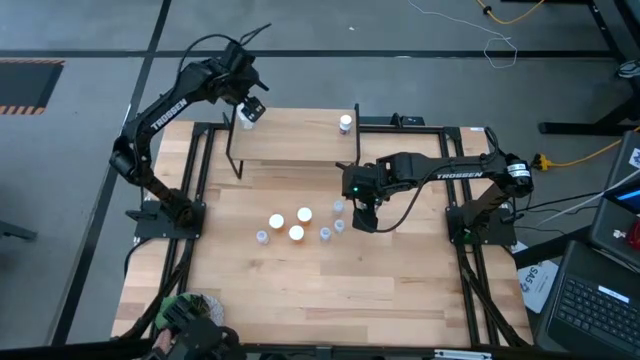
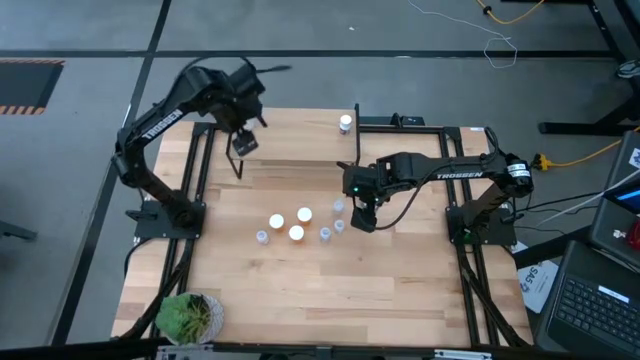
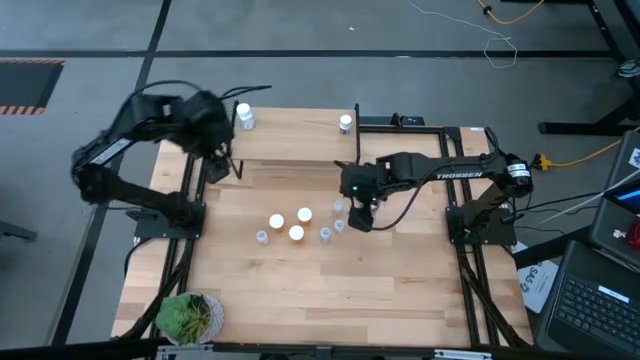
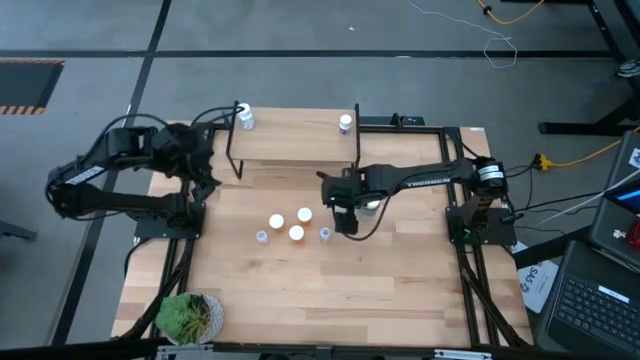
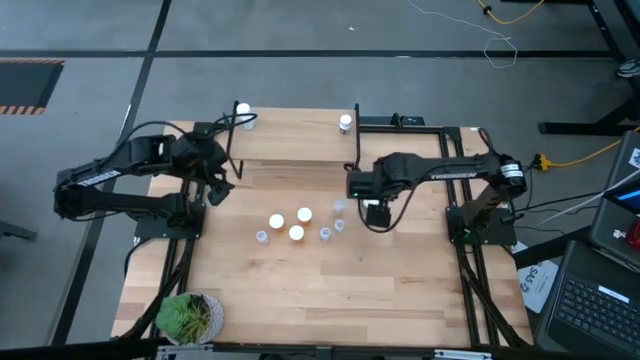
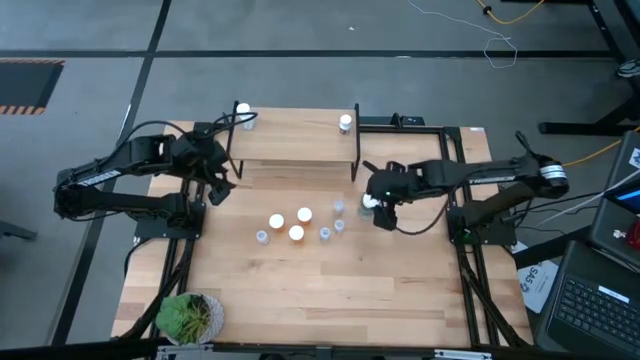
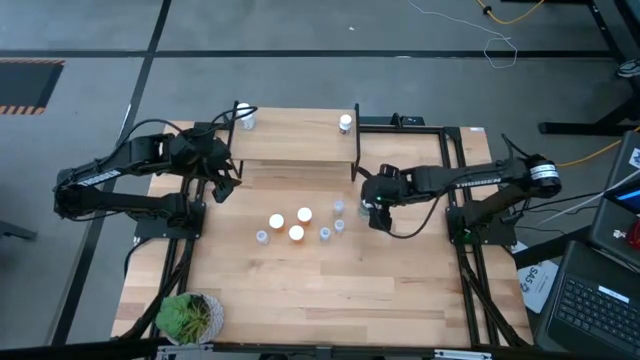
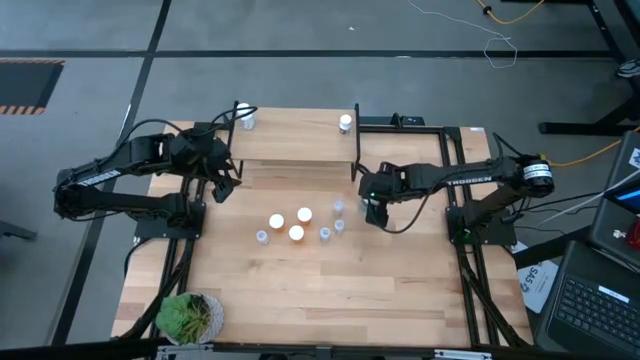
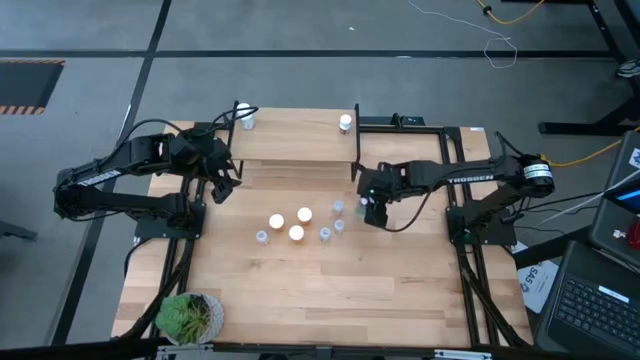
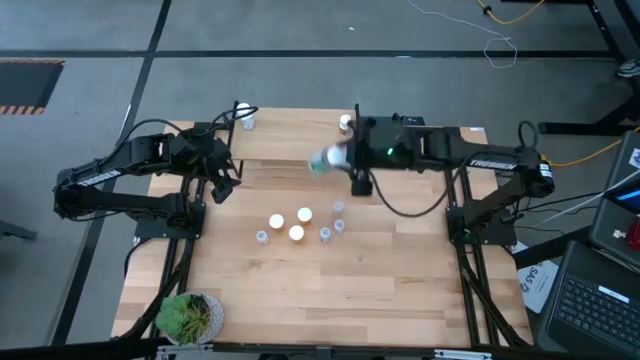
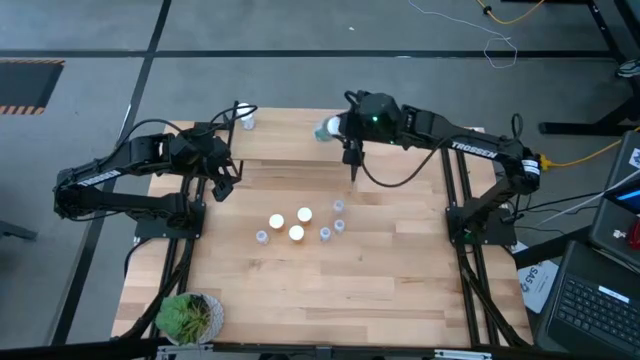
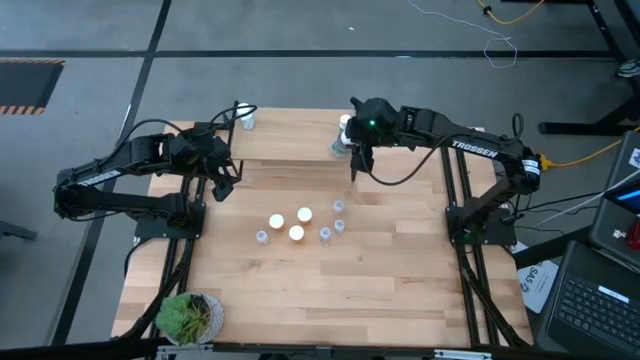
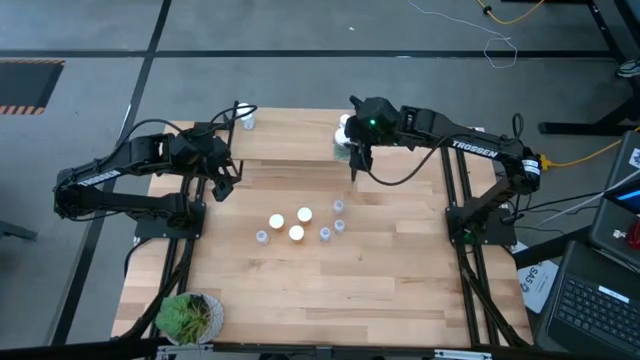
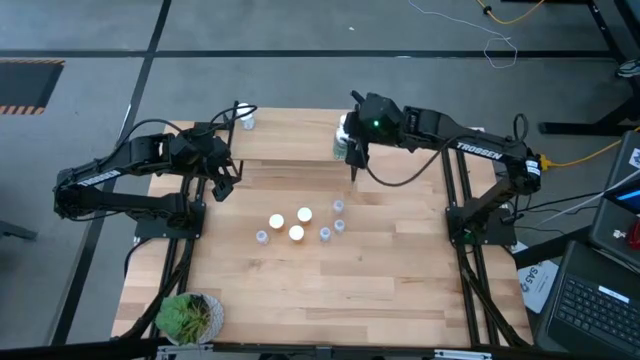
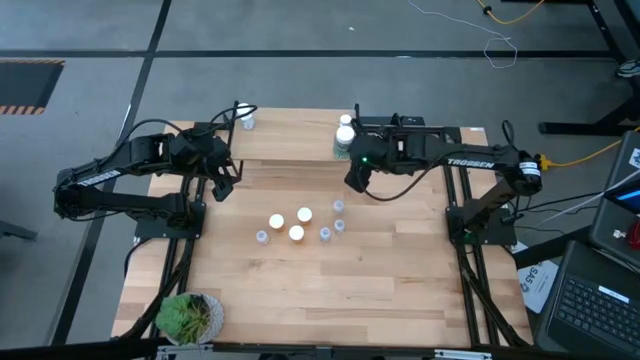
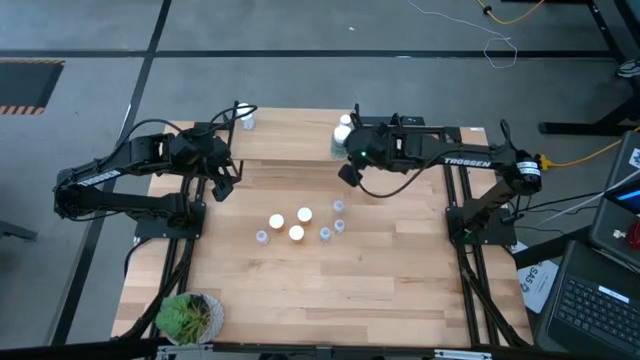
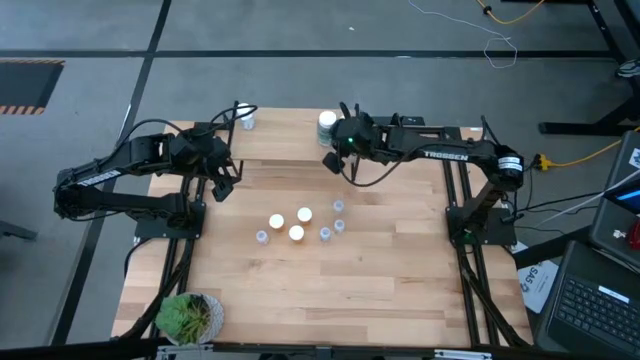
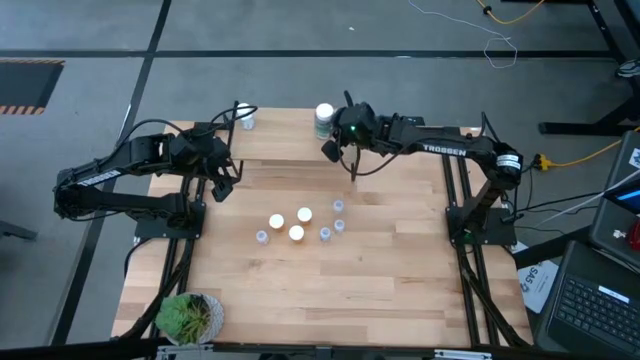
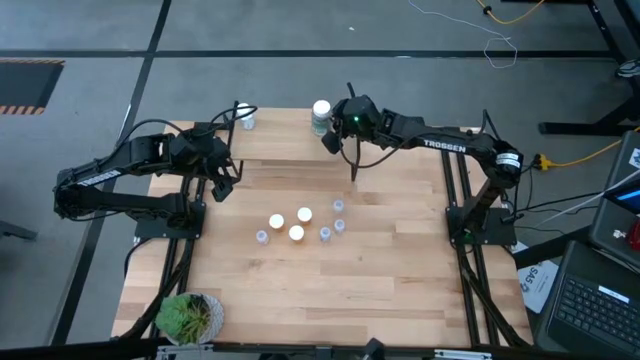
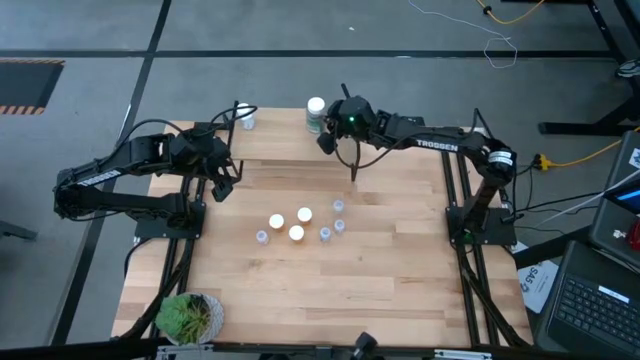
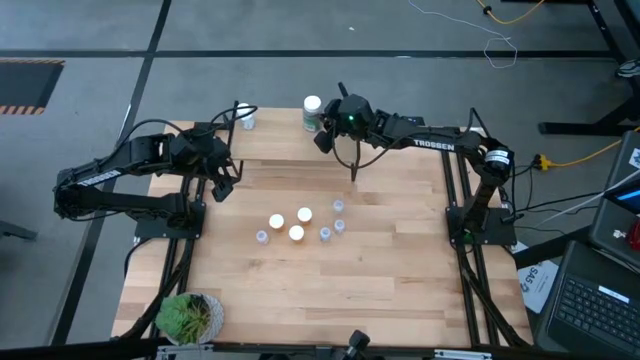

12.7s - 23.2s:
Task: Pick and place medicine bottles onto shelf by color
Put the green pill bottle on the shelf

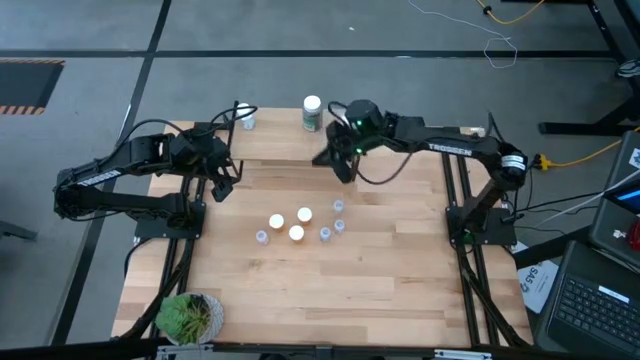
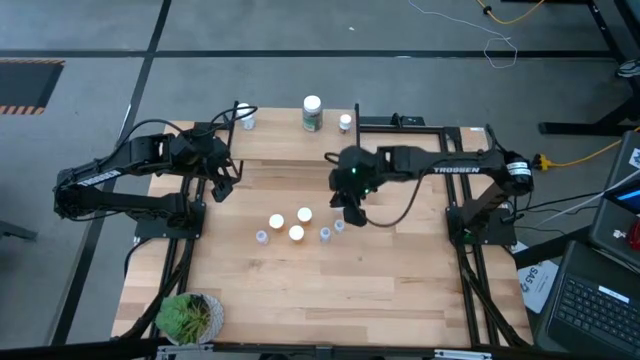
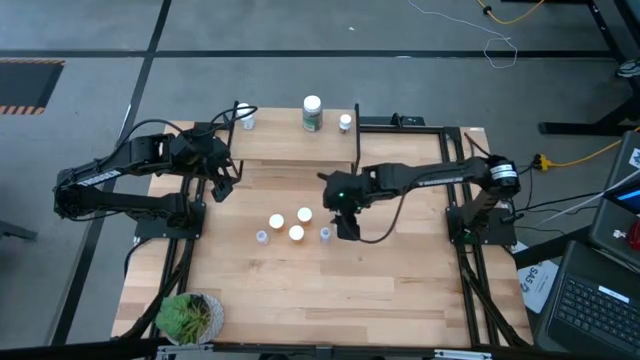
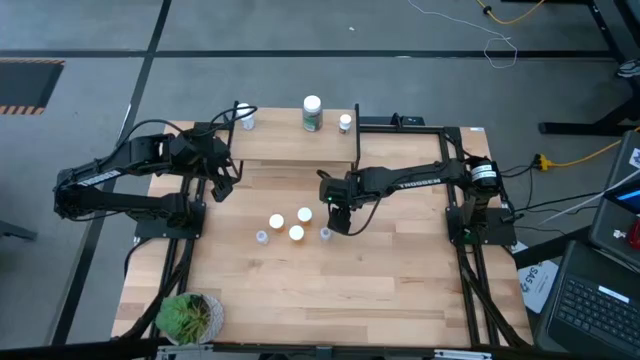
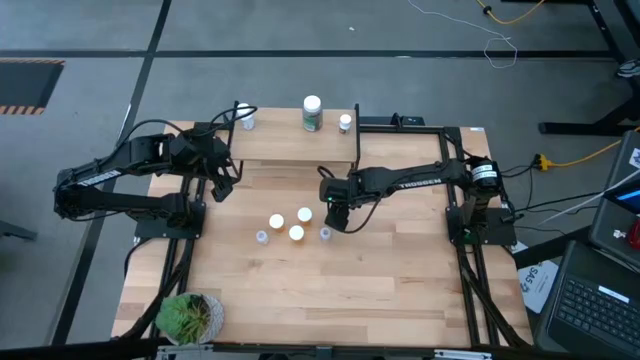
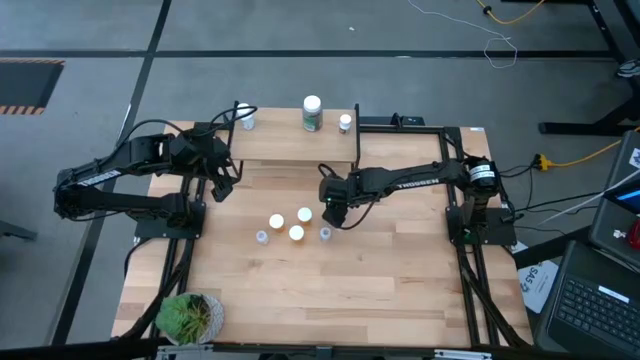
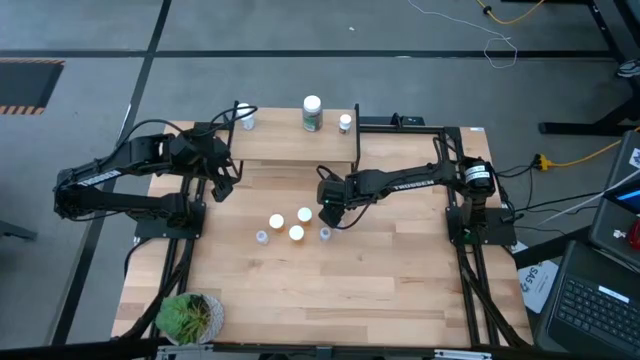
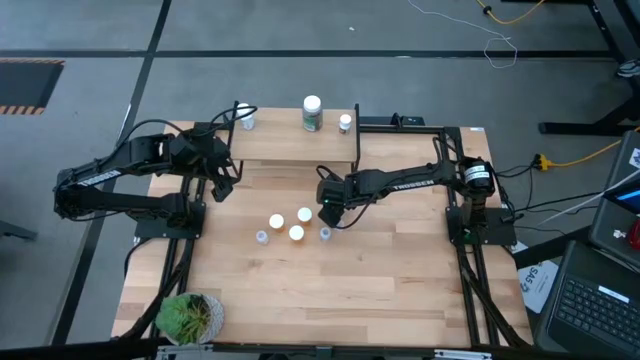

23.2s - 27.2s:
Put the transparent pill bottle on the shelf

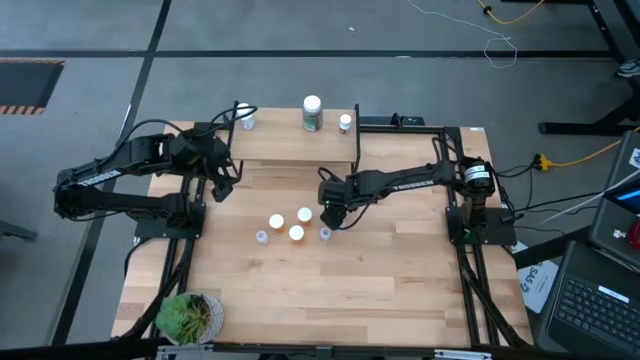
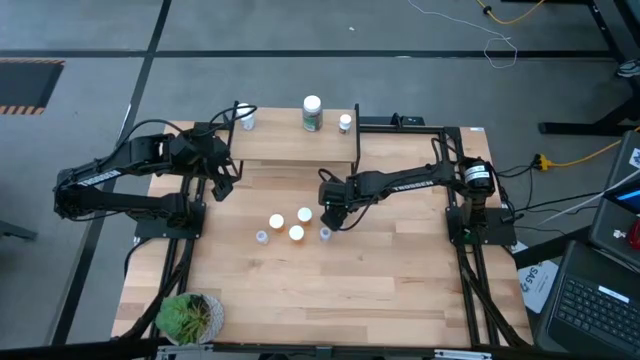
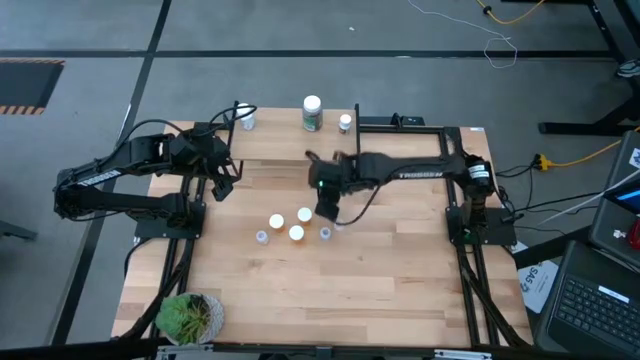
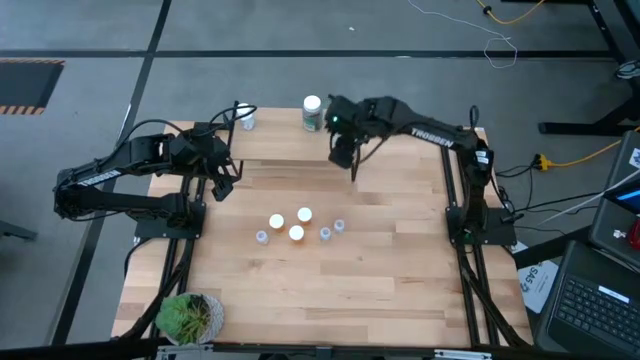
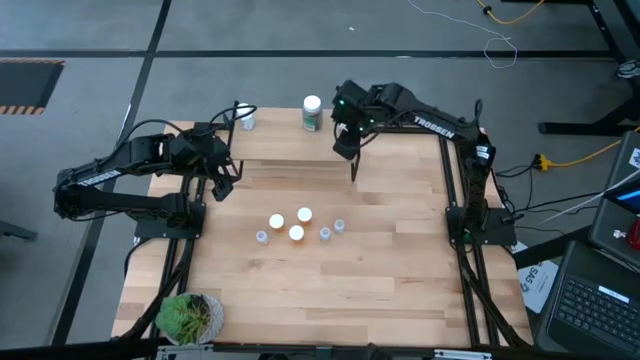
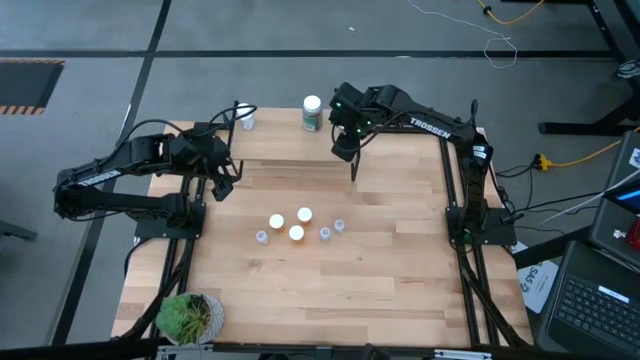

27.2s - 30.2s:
Put the transparent pill bottle on the shelf

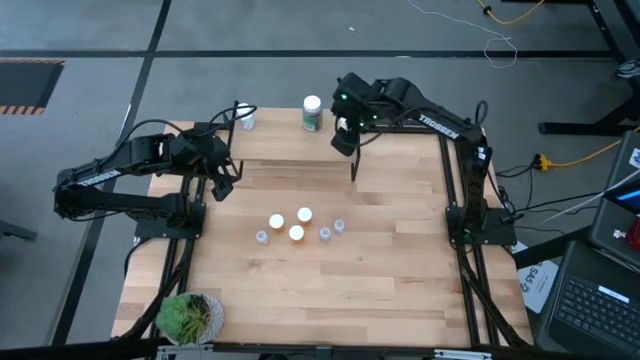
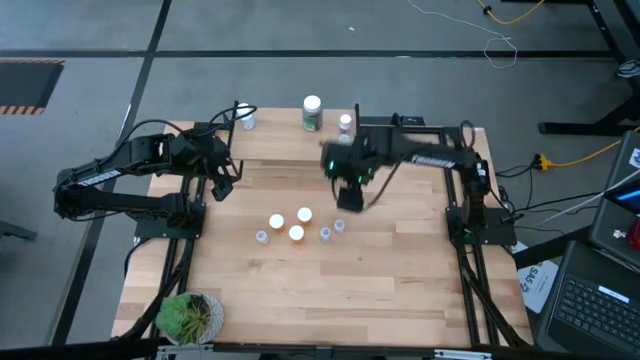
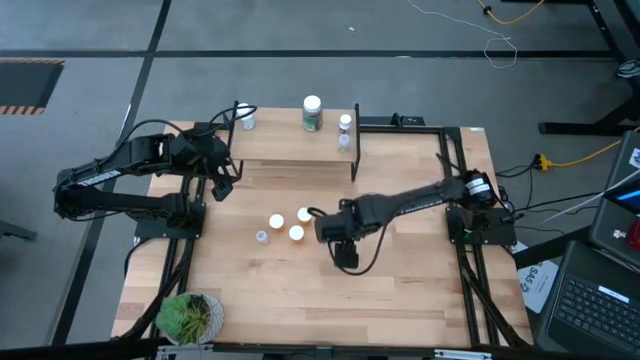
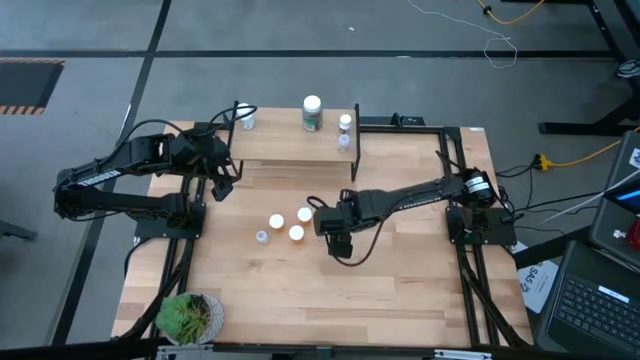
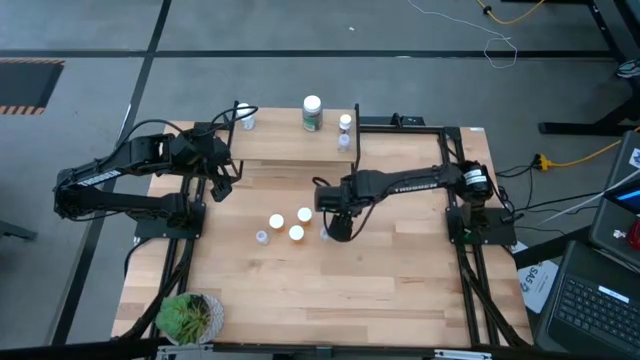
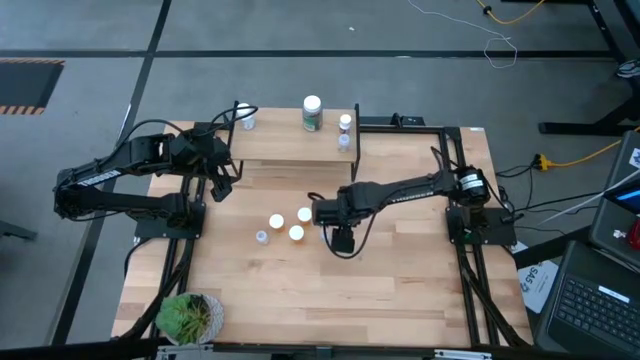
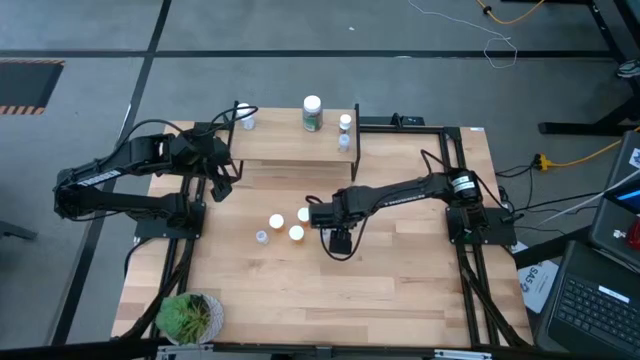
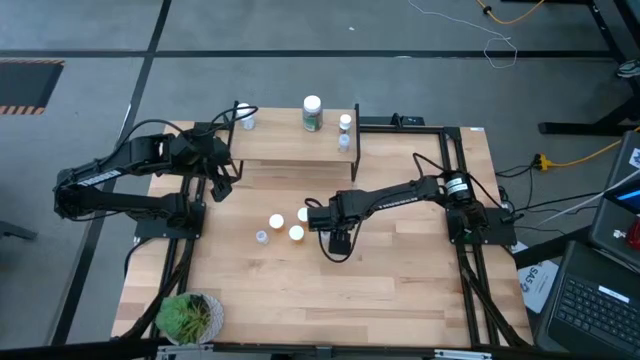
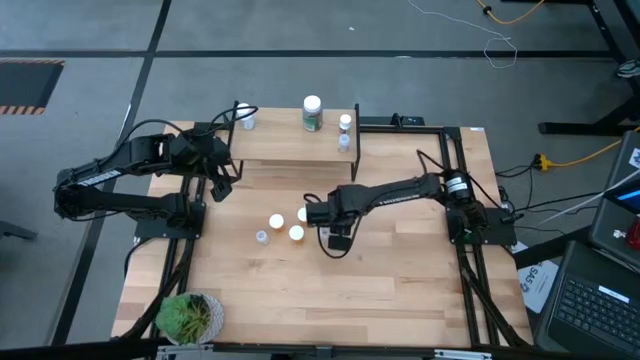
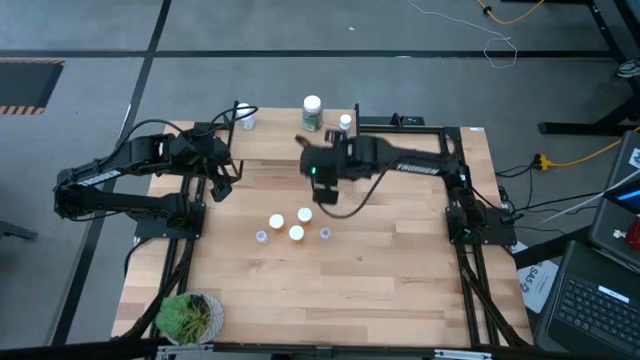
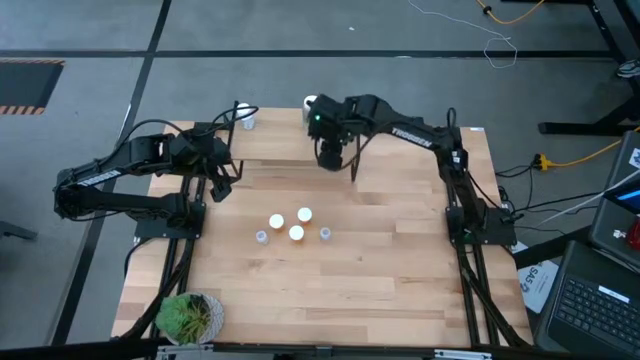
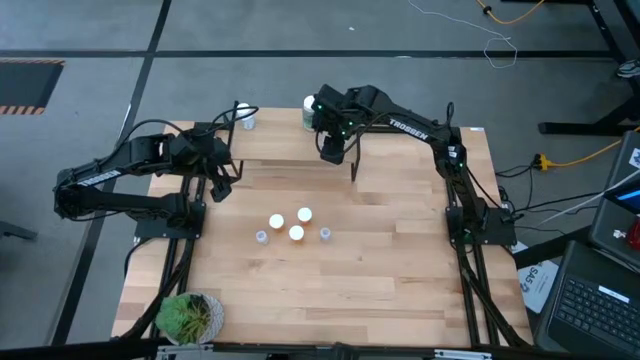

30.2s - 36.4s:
Put the transparent pill bottle on the shelf
